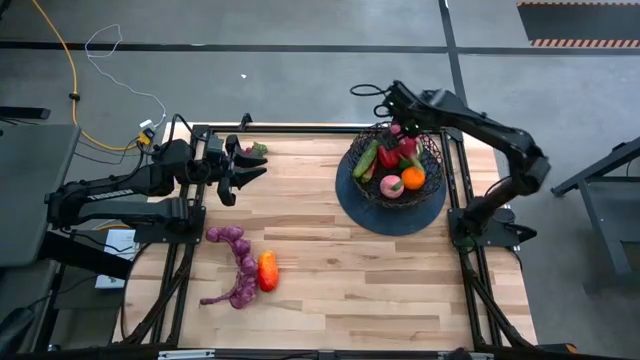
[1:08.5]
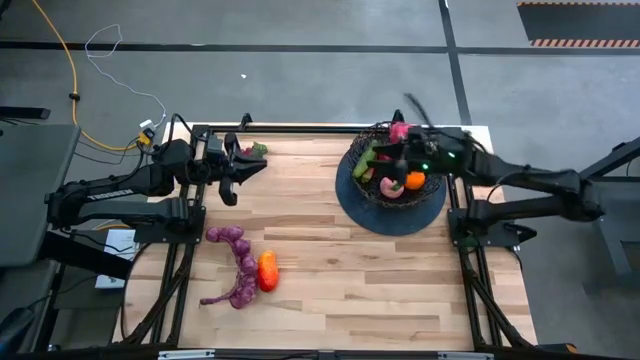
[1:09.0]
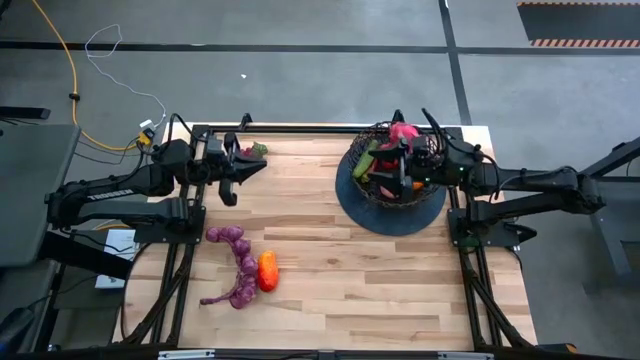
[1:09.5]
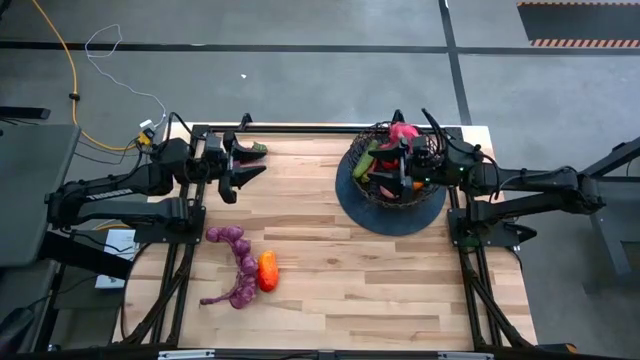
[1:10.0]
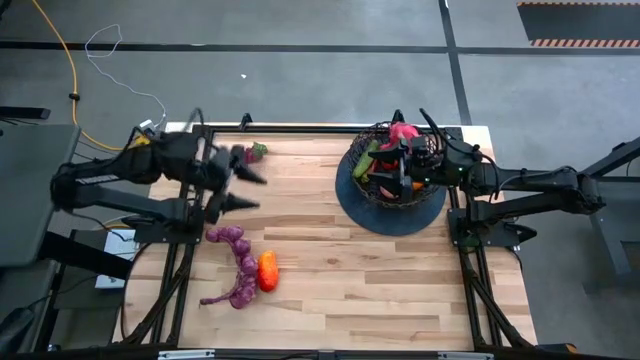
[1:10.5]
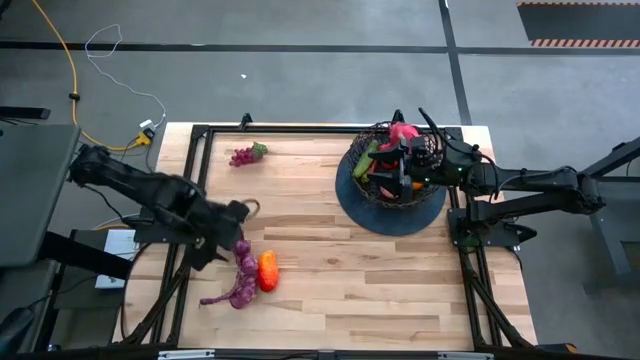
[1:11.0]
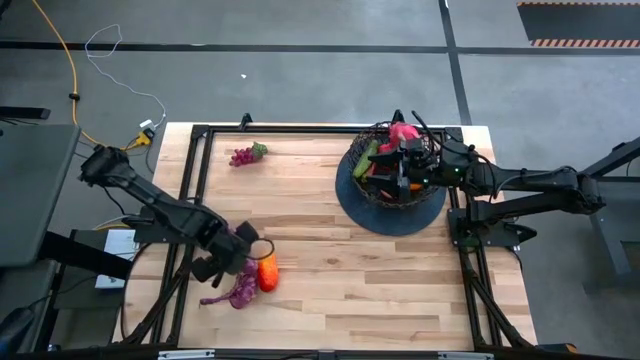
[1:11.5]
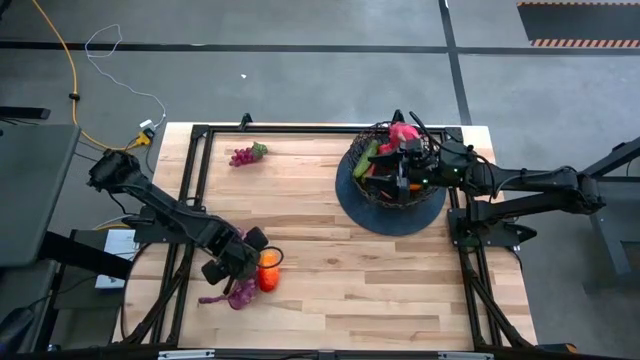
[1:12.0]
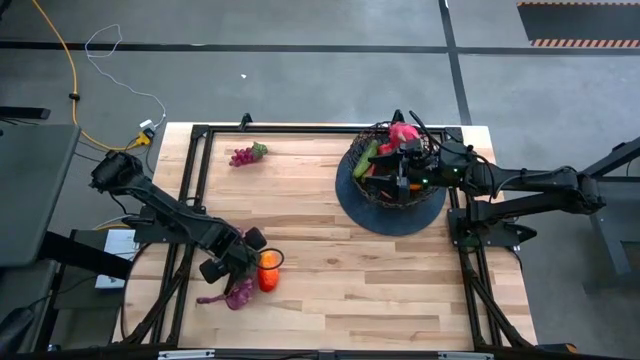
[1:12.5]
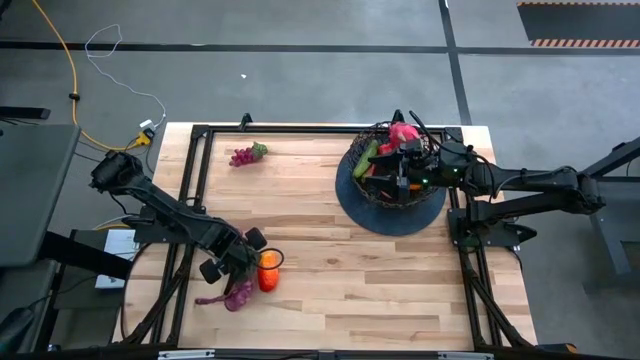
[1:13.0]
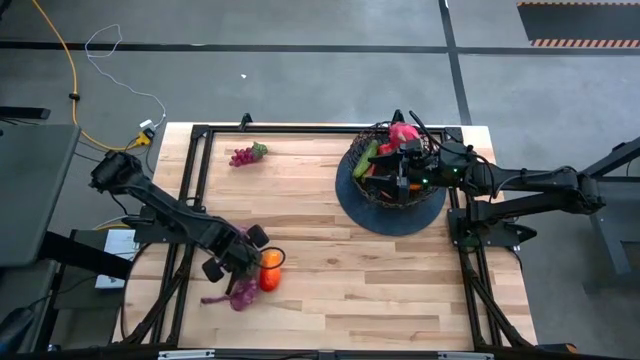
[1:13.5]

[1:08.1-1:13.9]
Task: Build produce basket
Put the purple garlic into the wire basket

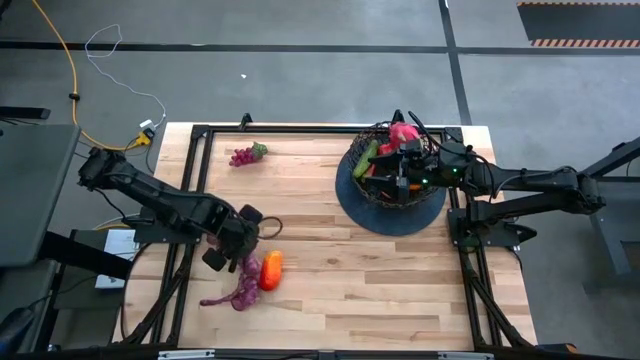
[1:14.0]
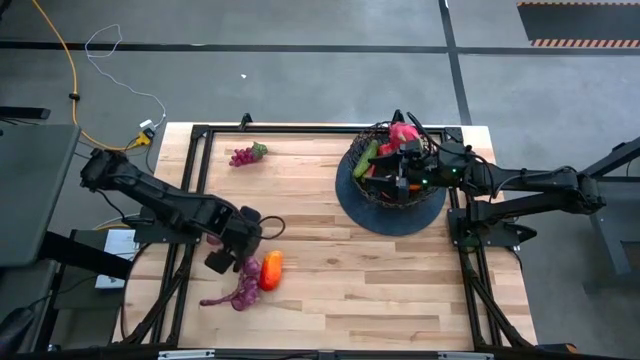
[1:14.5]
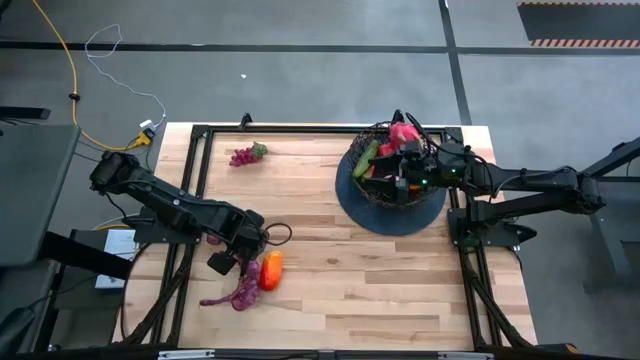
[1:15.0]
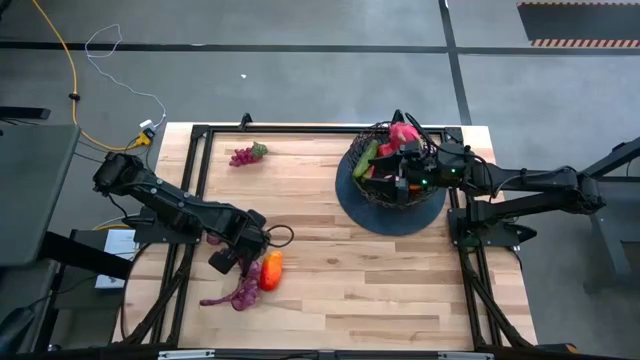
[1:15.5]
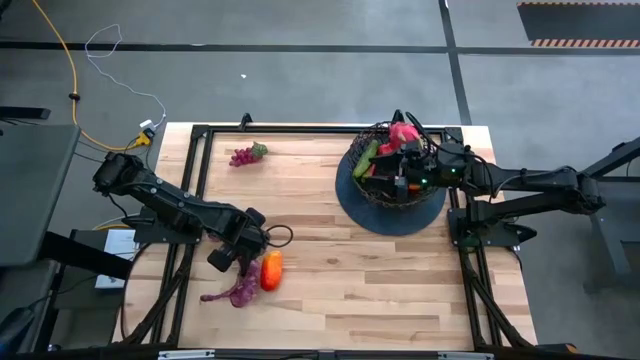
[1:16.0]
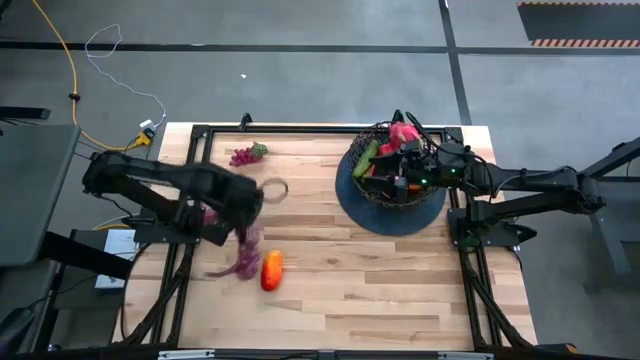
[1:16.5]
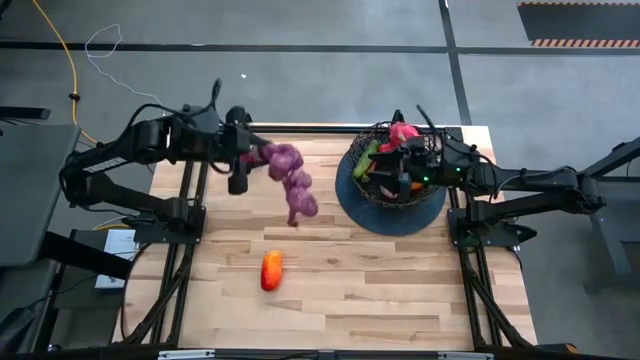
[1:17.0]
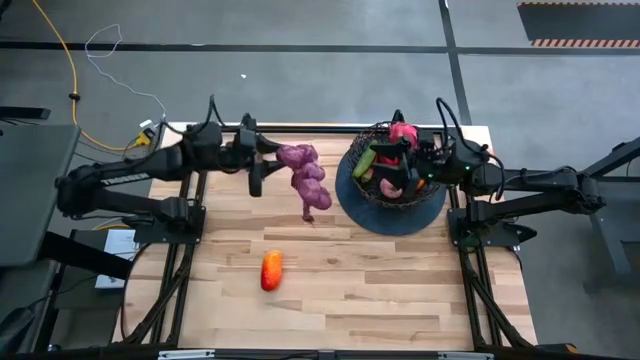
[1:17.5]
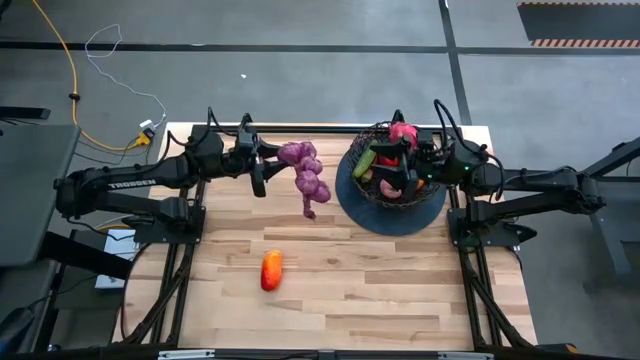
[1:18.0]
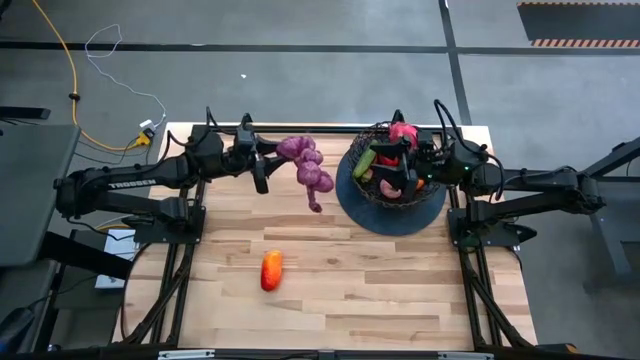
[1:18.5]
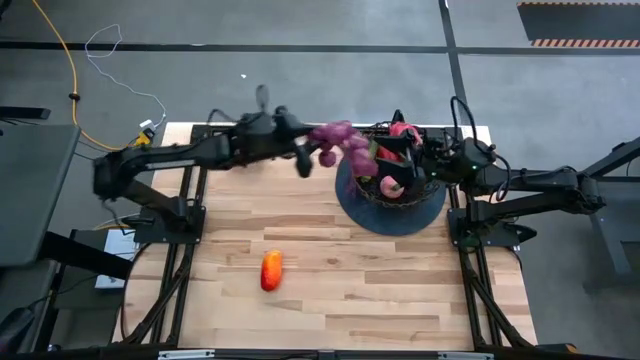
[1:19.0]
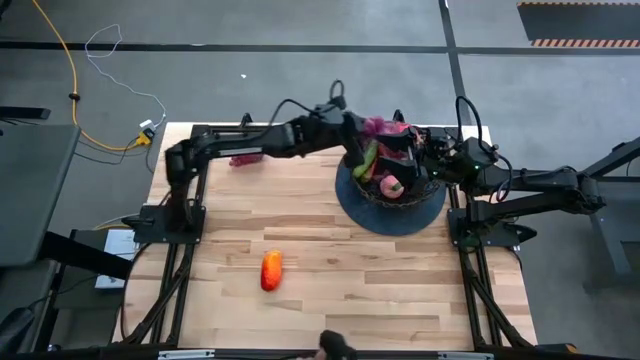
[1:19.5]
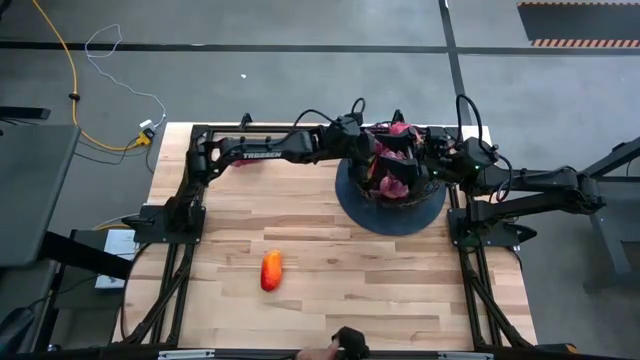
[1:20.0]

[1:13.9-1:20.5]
Put the purple garlic into the wire basket

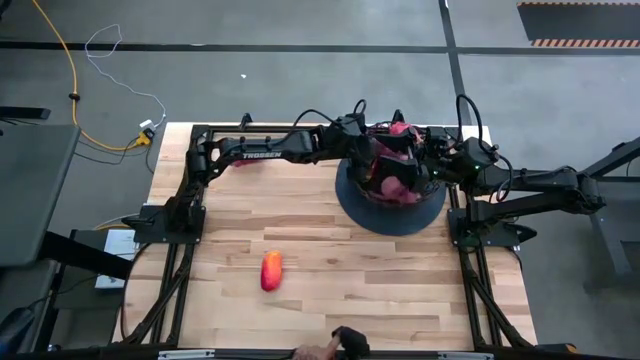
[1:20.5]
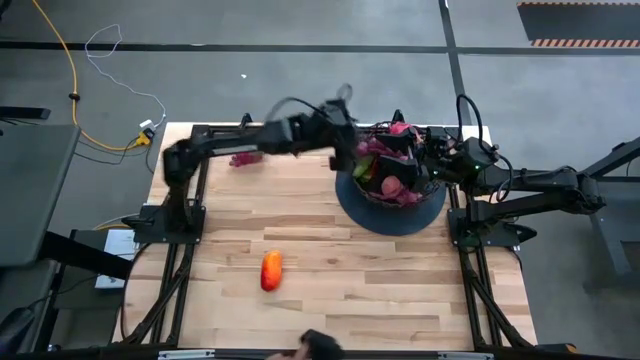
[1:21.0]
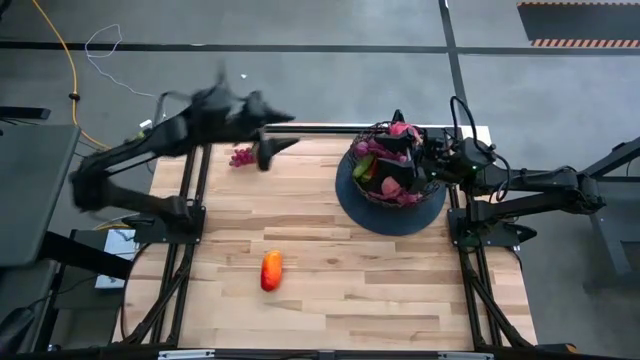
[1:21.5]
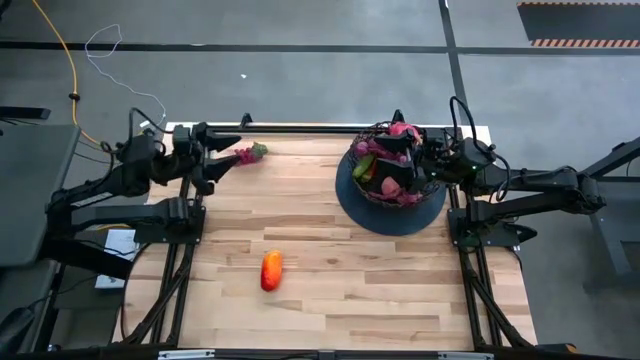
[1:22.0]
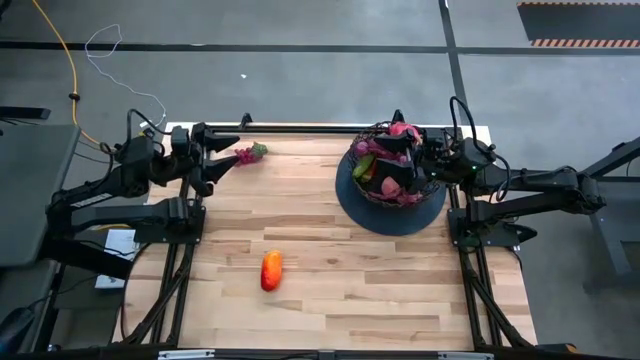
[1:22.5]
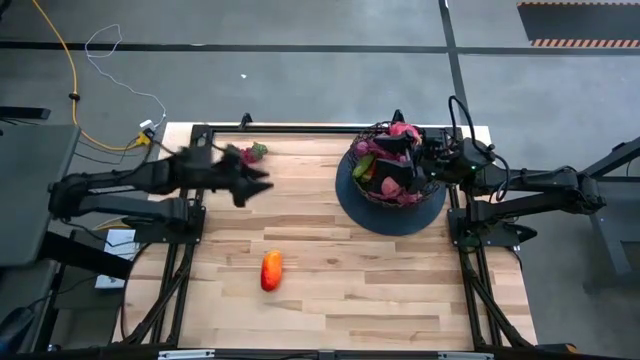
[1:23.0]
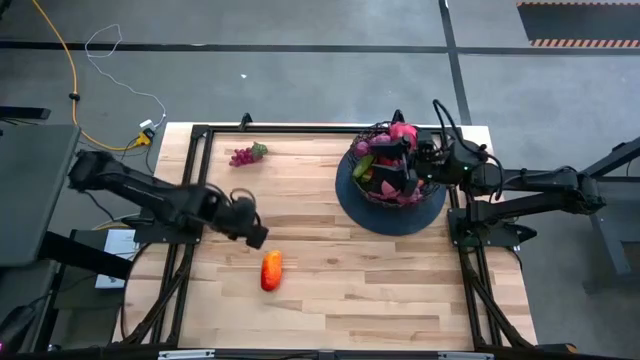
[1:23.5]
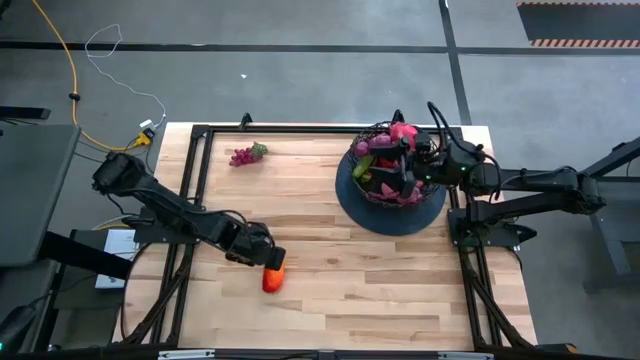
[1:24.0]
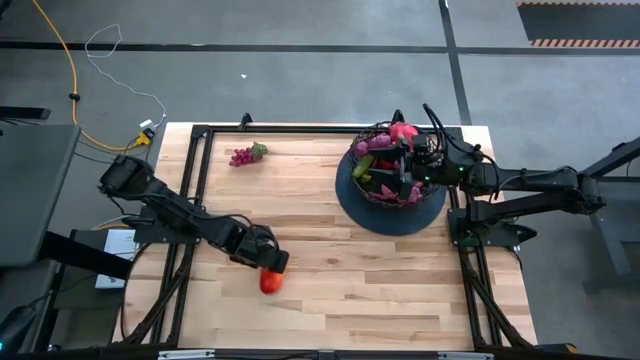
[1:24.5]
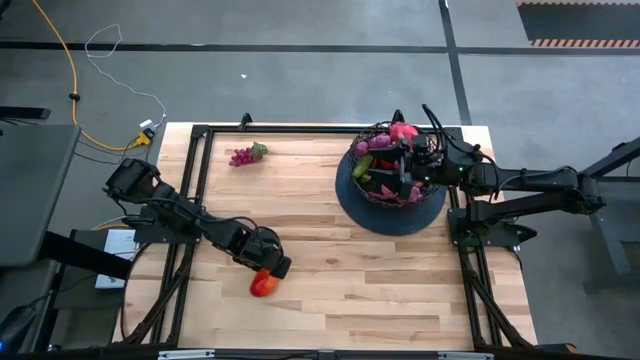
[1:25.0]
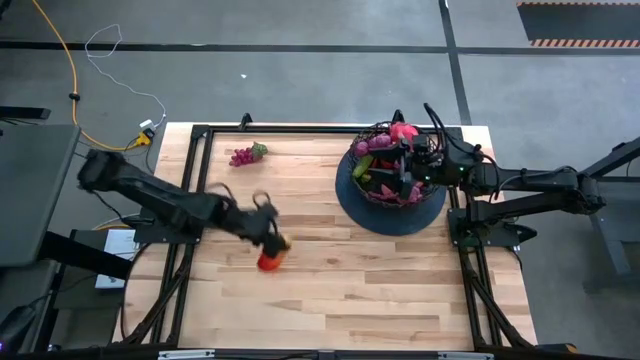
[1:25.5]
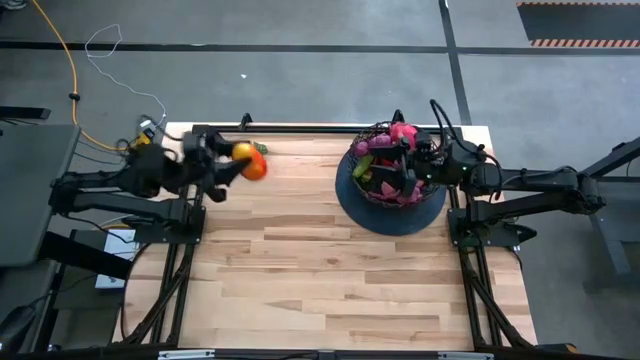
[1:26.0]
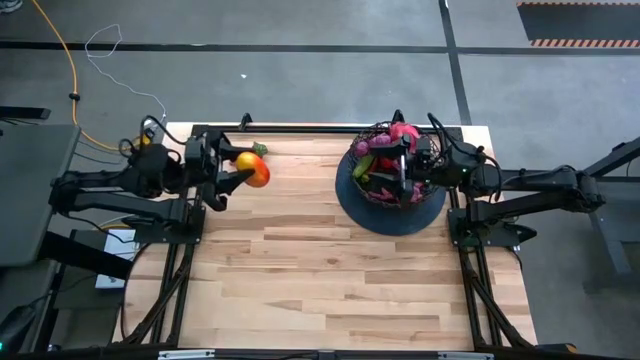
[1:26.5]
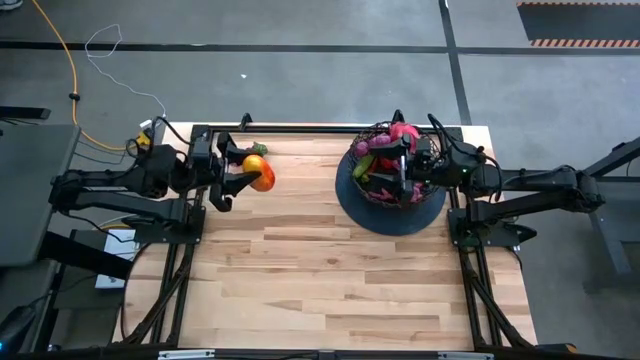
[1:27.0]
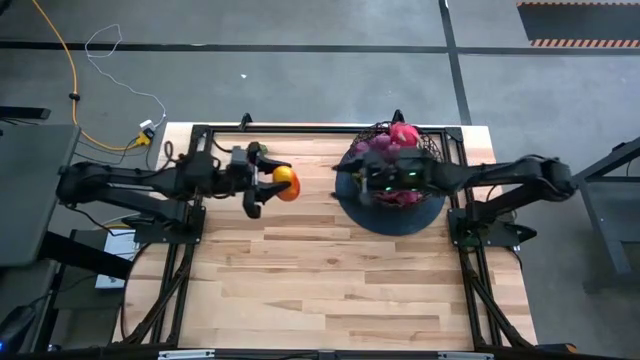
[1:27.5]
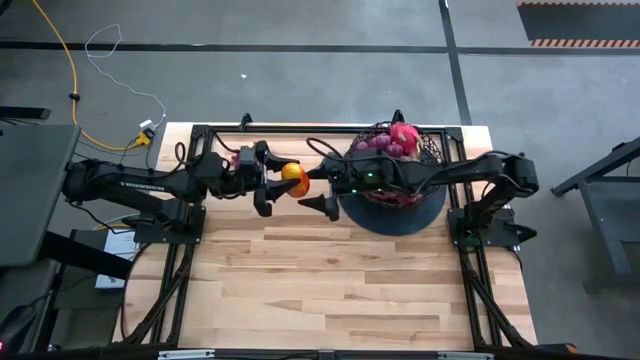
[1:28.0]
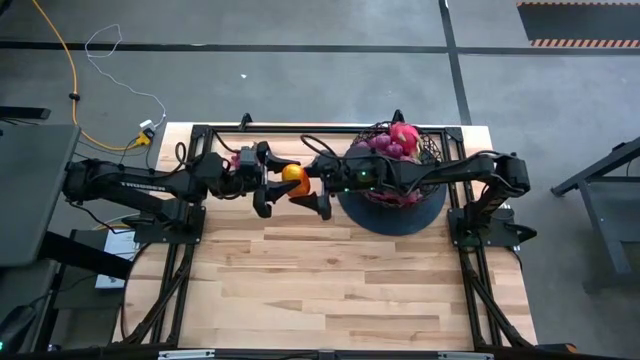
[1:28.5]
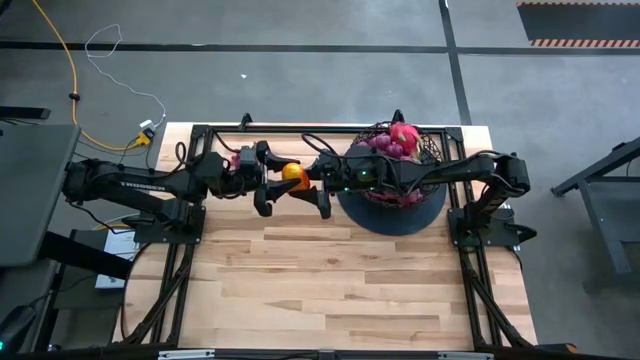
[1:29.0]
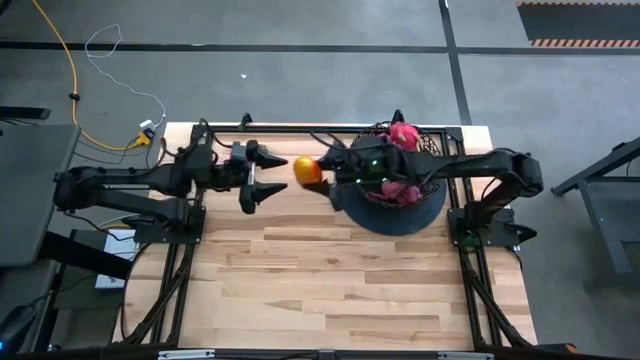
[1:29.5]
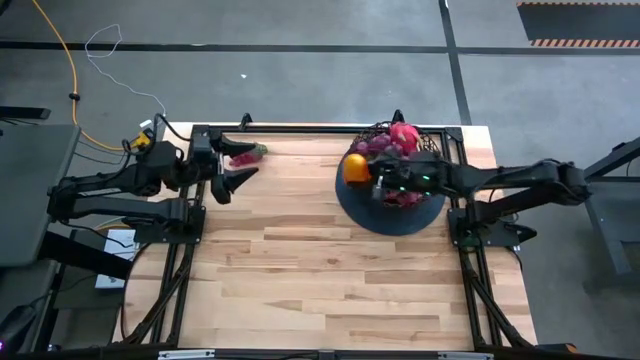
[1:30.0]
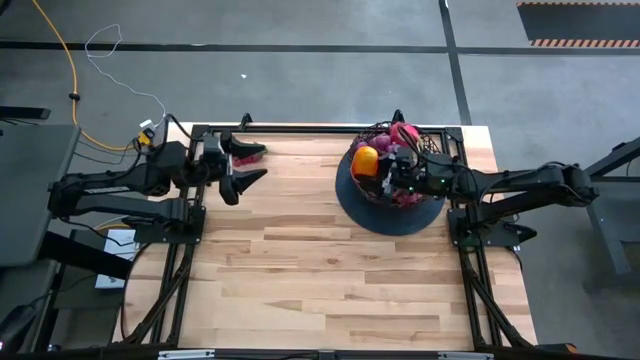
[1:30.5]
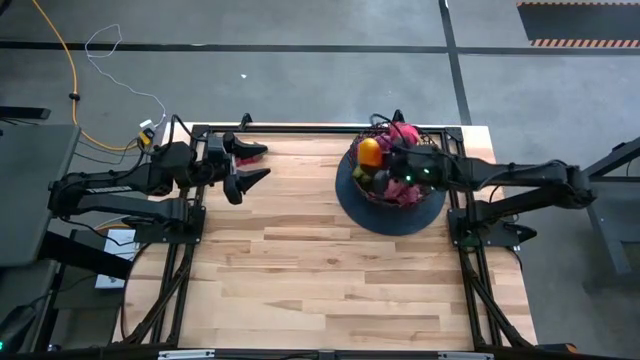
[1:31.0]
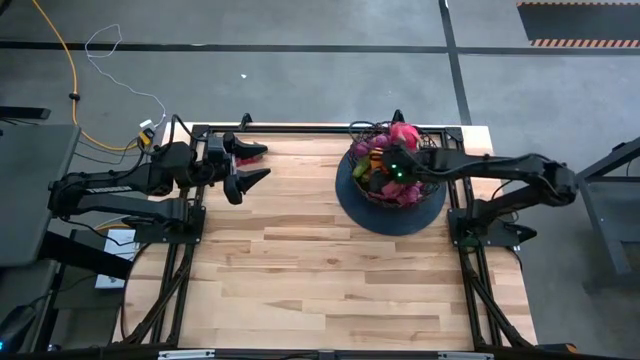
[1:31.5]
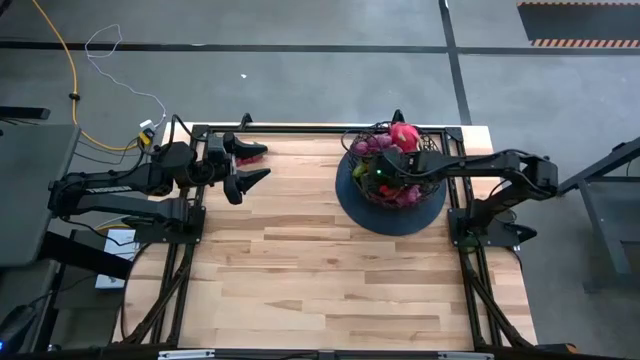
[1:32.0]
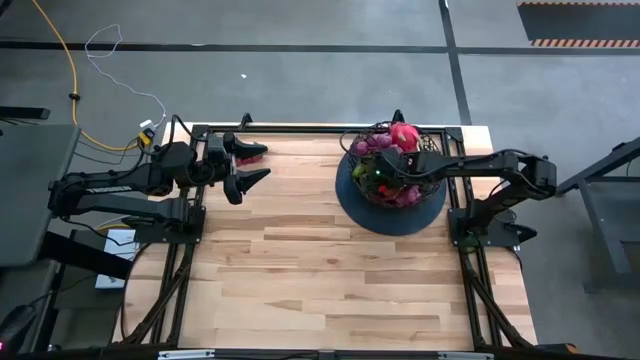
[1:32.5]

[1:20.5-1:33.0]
Put the mango into the wire basket
